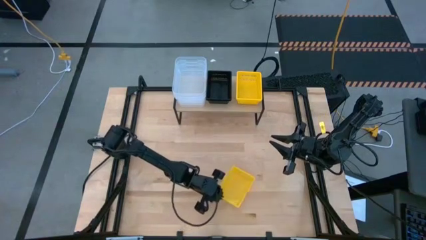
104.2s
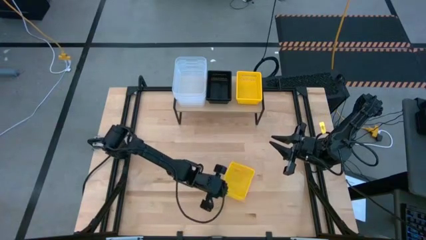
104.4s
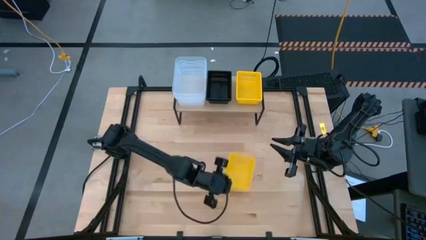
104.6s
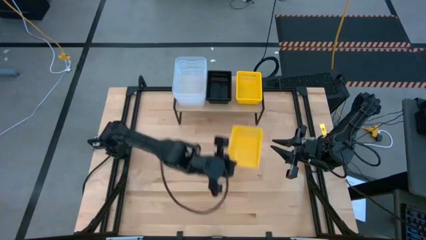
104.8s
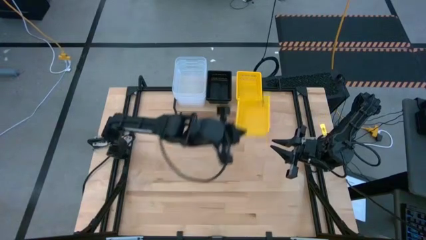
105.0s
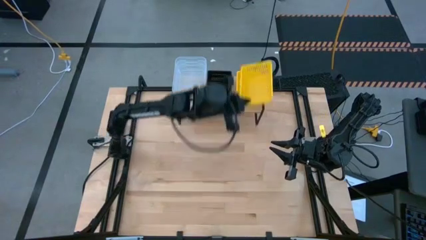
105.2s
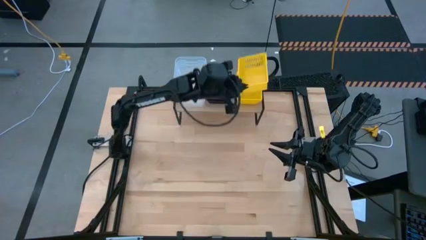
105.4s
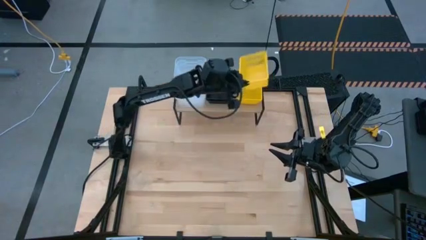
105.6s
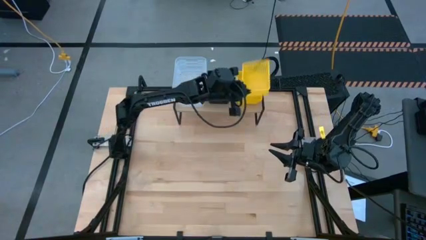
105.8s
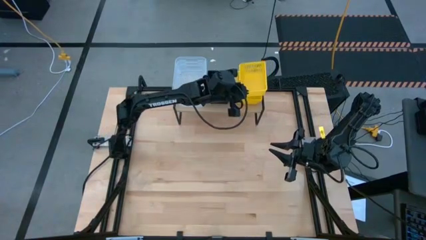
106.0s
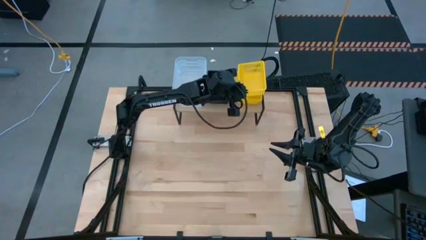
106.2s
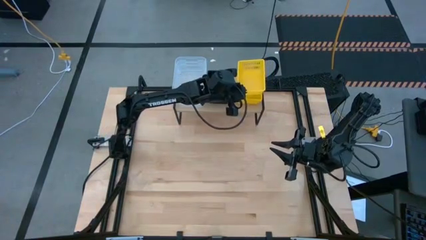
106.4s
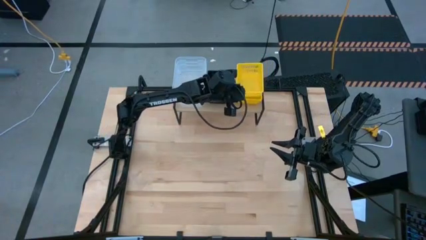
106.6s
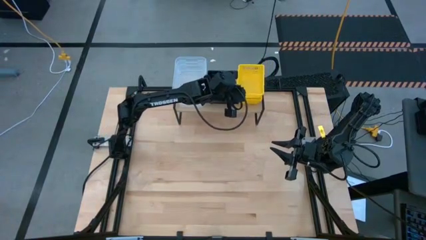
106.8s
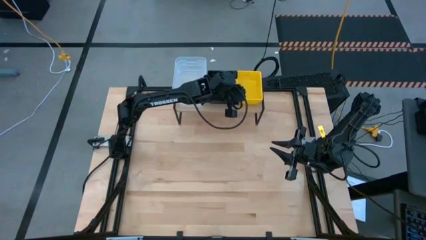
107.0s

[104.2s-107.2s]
Task: Stack baskets on shelf by color
Stack the yellow bin on top of the yellow bin on the shelf

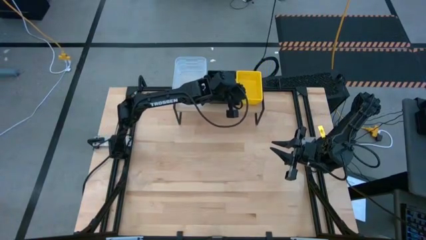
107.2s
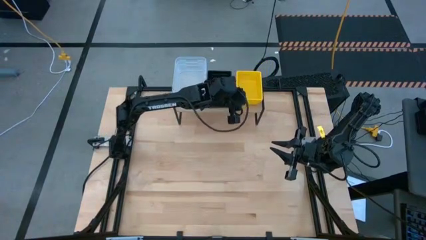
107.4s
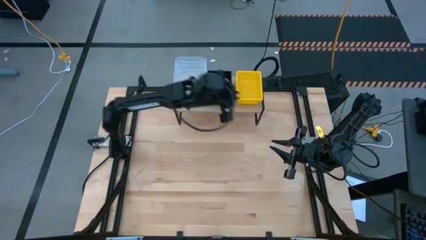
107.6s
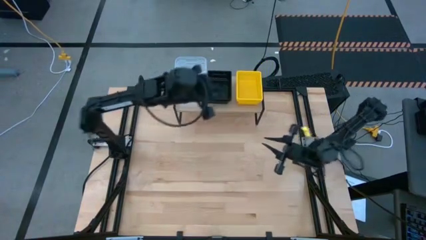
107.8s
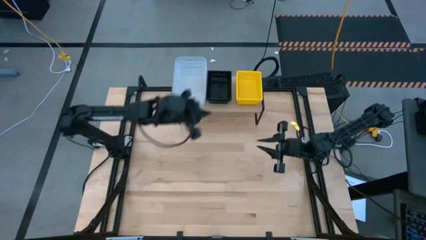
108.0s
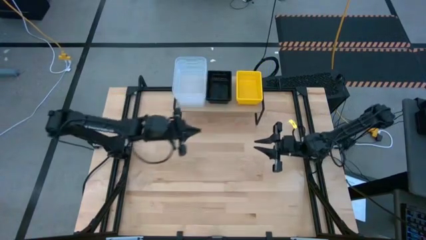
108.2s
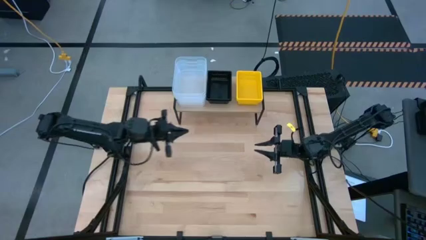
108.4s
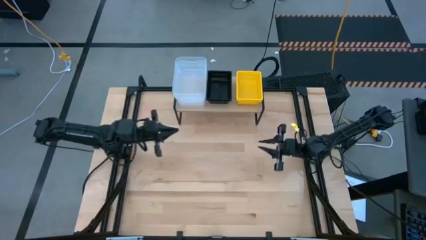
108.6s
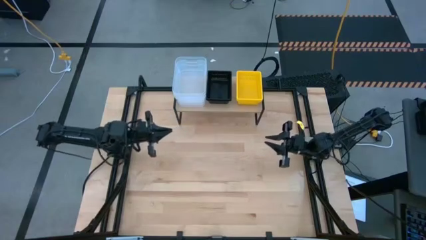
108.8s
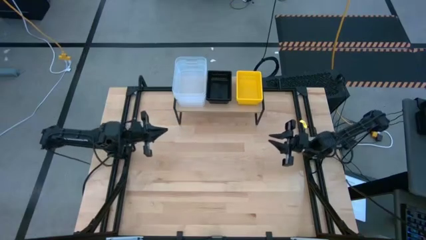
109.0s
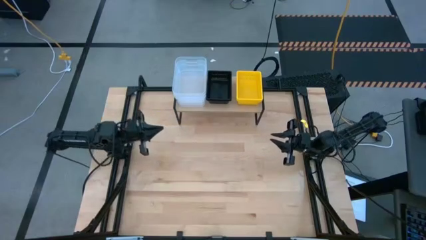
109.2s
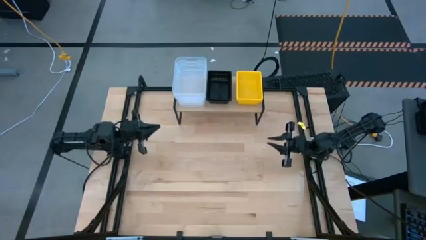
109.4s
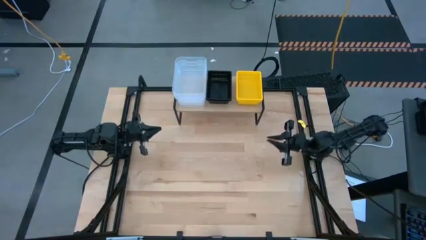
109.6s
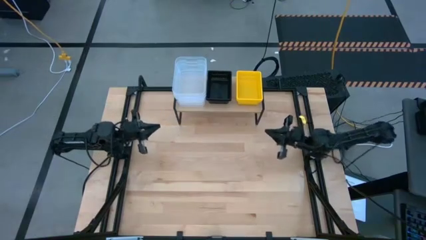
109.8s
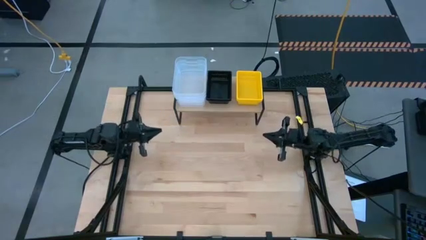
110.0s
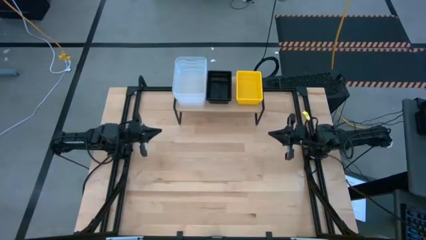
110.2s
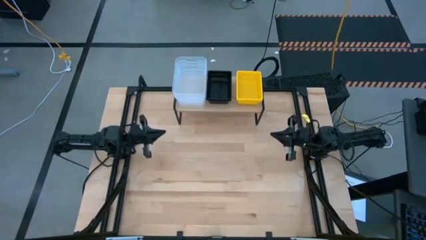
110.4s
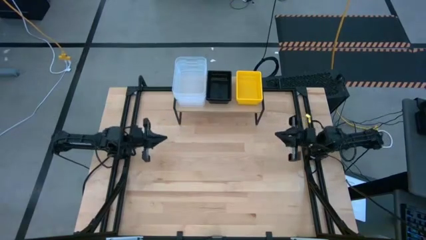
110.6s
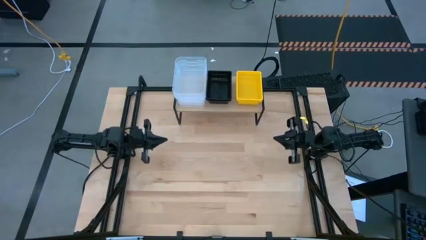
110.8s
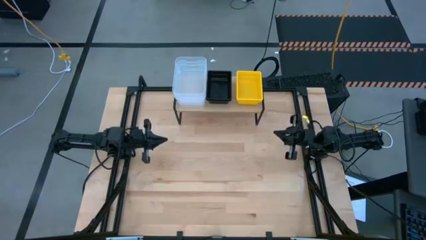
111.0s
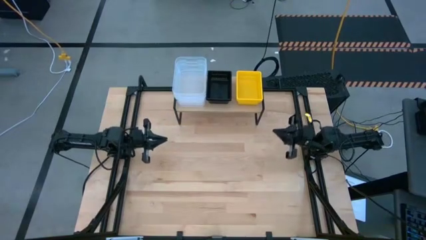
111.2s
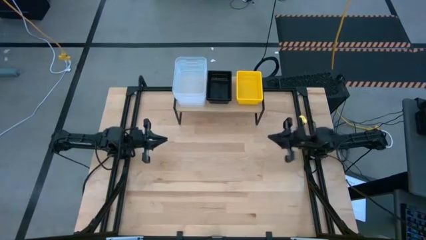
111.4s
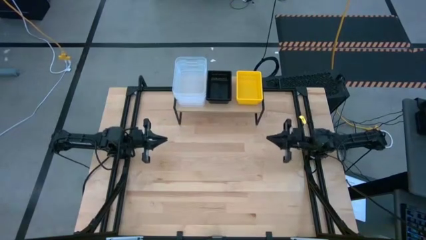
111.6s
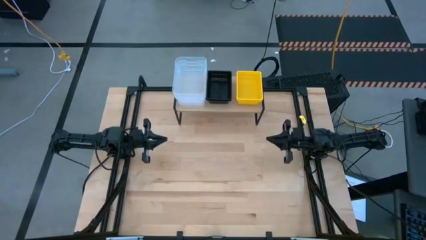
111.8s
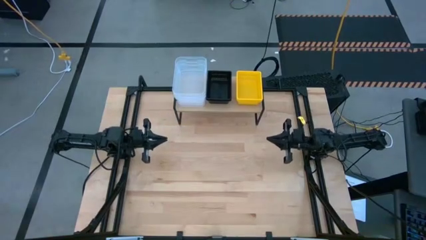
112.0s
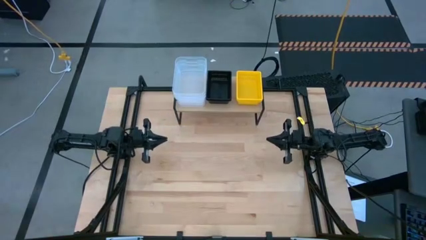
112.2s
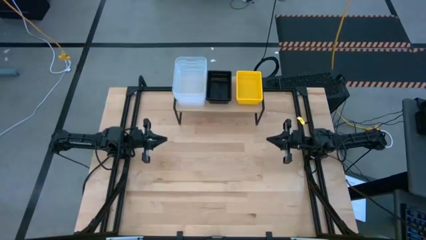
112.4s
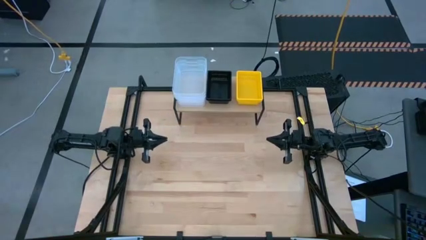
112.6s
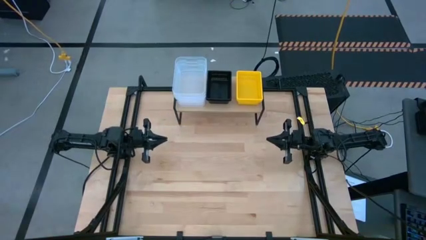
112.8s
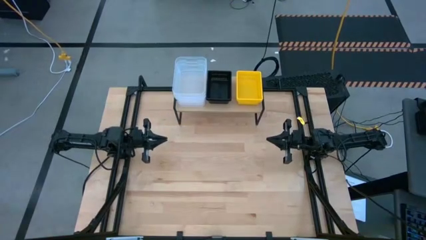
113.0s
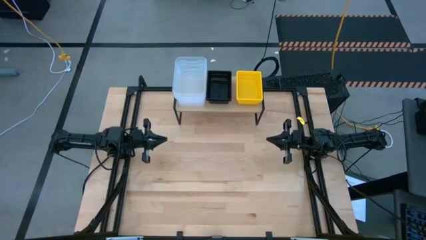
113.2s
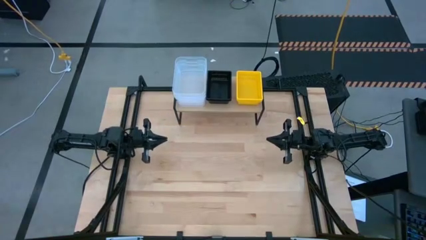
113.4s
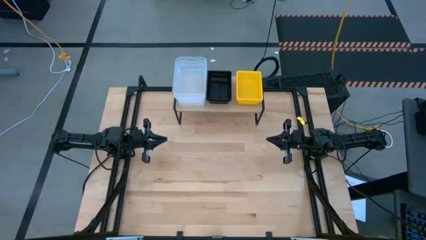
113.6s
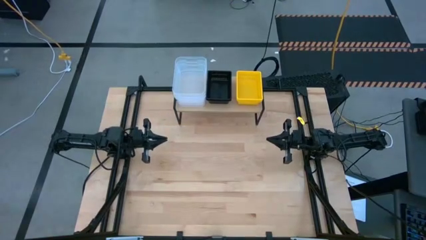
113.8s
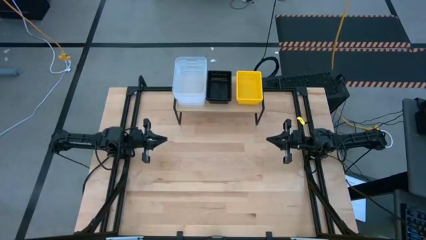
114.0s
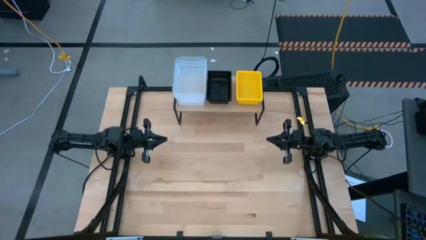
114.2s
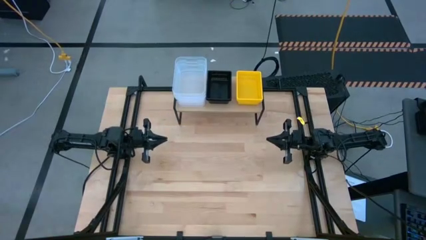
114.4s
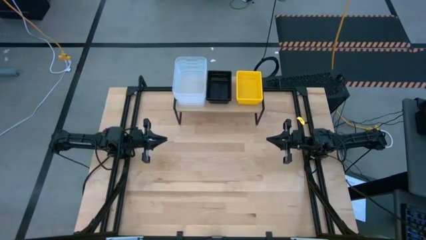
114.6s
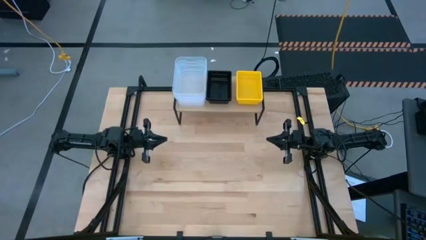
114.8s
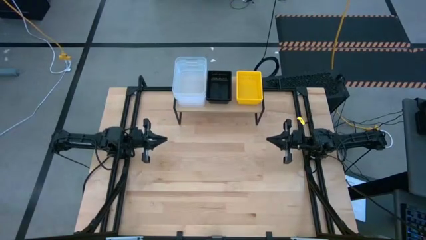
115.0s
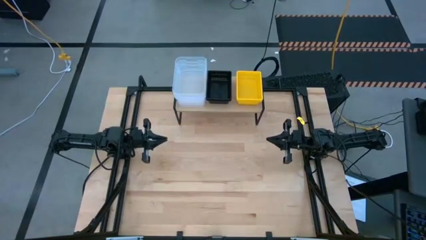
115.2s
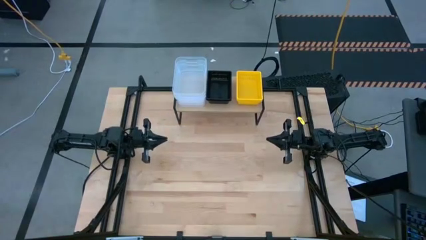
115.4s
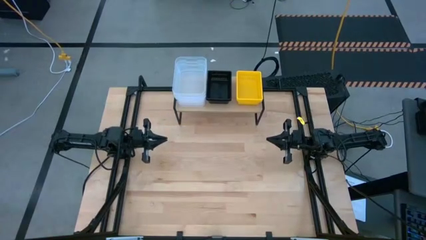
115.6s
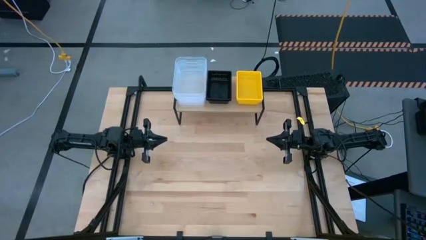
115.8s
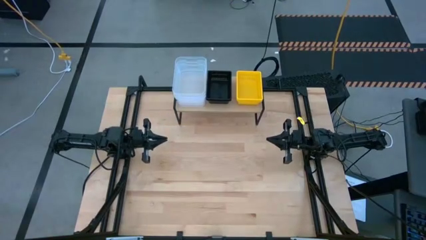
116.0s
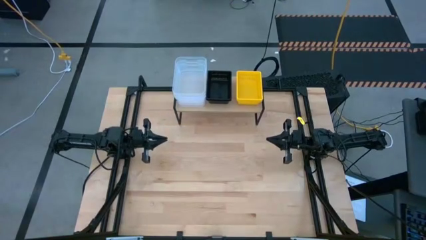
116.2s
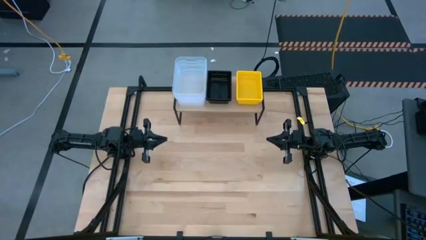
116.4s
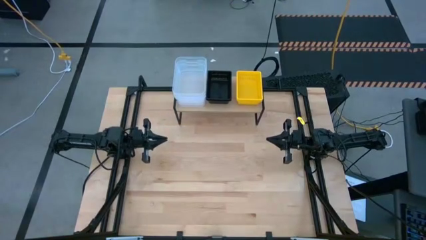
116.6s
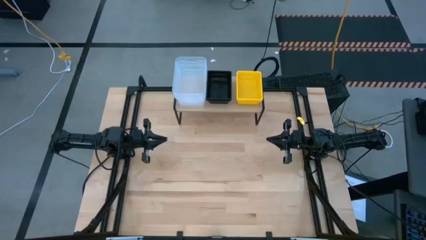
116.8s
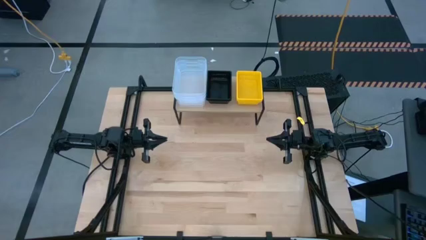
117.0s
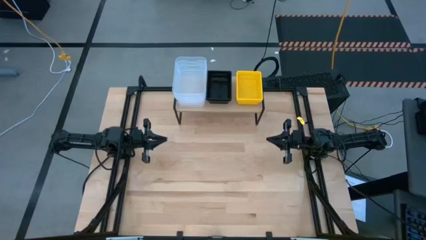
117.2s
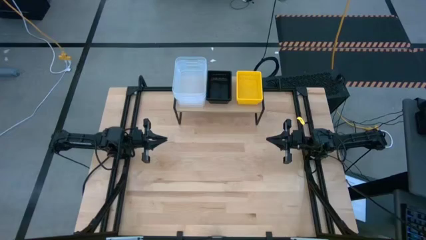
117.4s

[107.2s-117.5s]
Return to Home Position

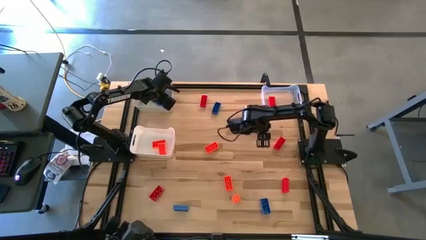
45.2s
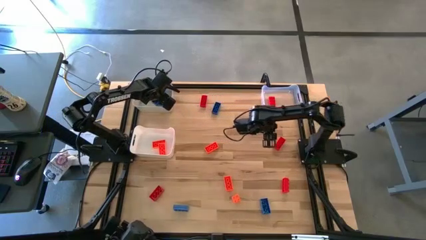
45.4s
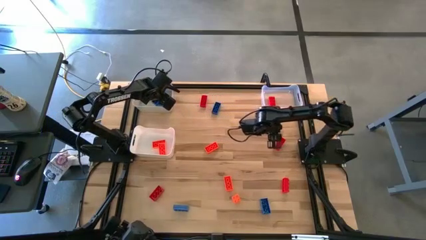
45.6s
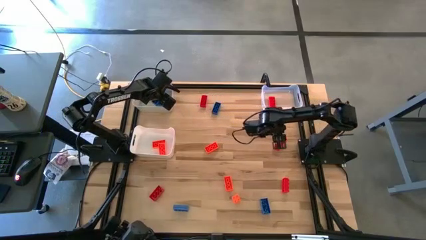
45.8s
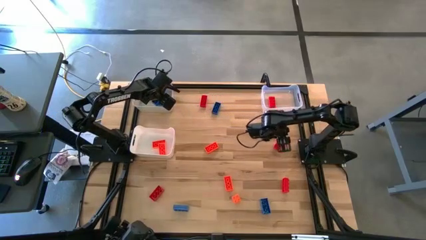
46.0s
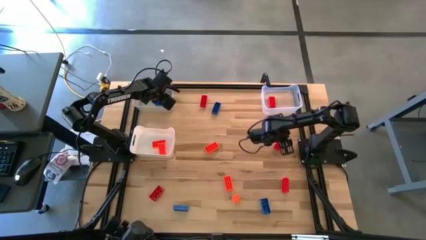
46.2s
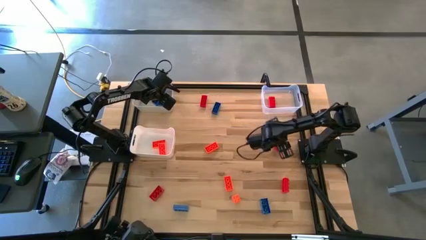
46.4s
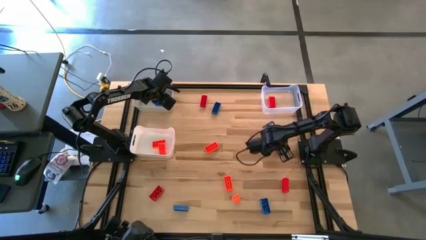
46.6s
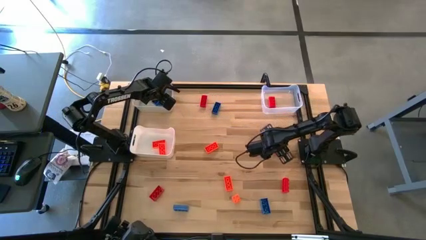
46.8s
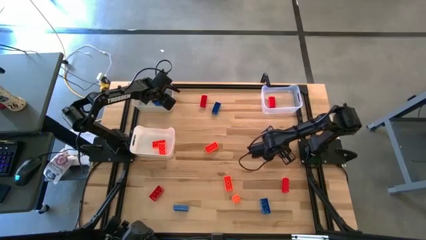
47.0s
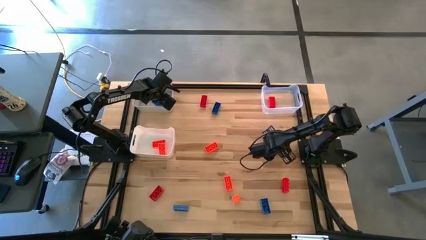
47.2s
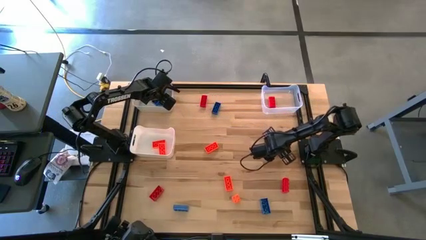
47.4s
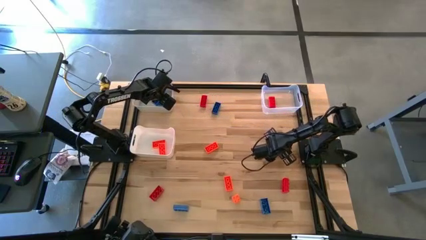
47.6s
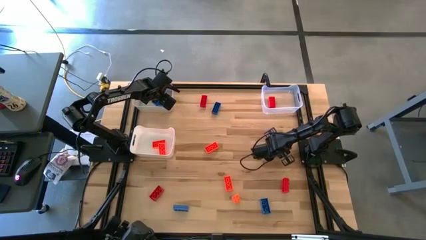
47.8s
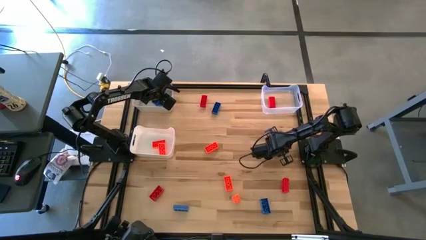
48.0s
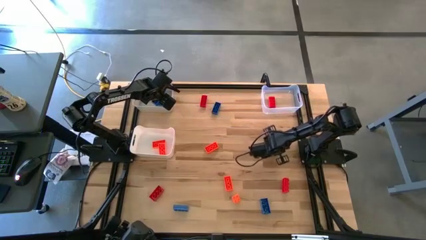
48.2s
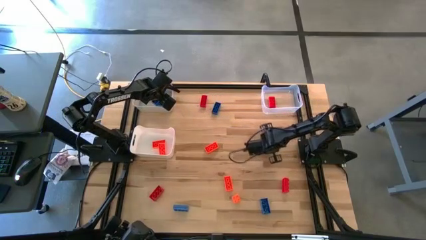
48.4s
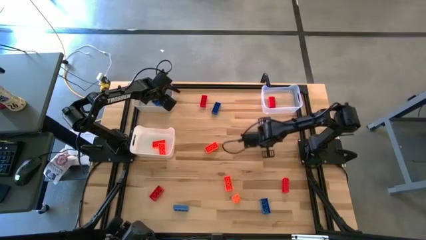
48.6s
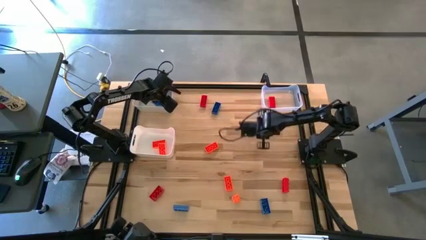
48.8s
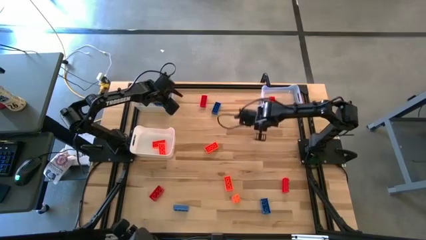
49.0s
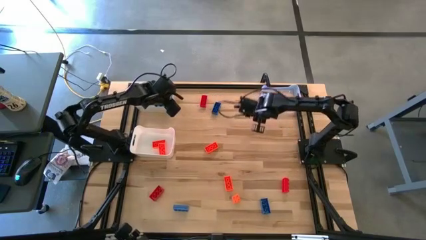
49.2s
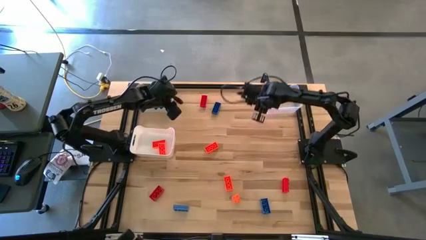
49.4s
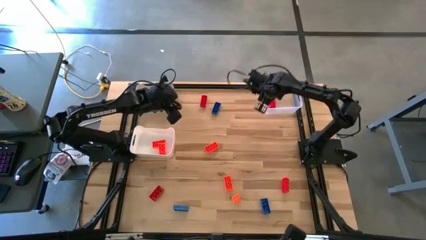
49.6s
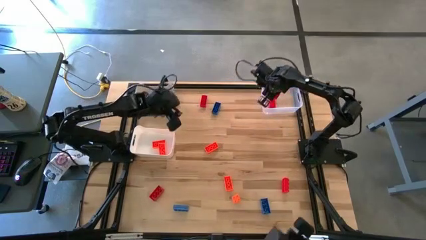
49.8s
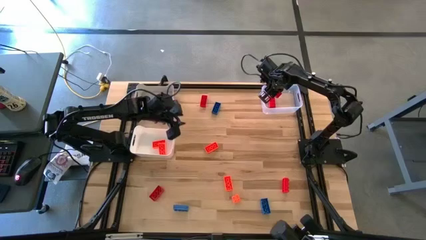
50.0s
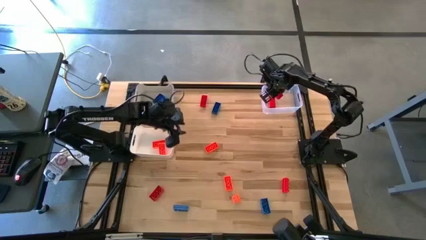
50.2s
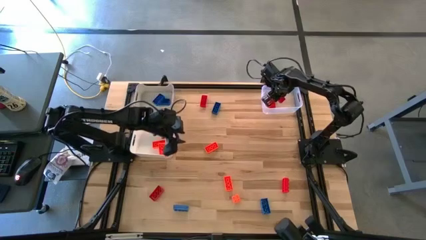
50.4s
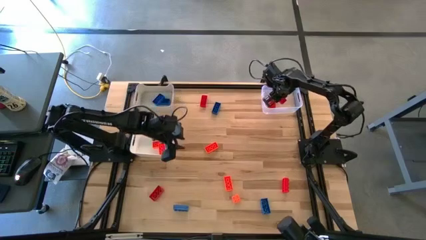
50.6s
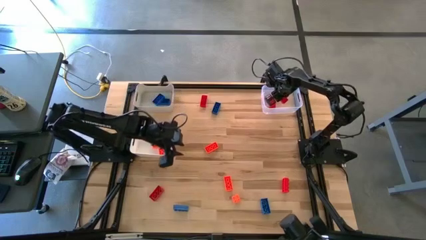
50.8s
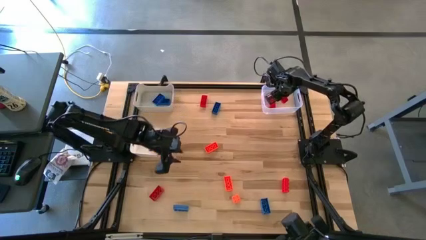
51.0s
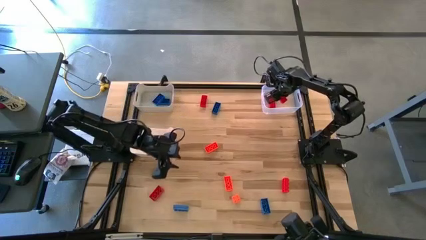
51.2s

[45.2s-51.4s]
Task: Sort & place blocks by color
Put the red game piece into the transparent bin
